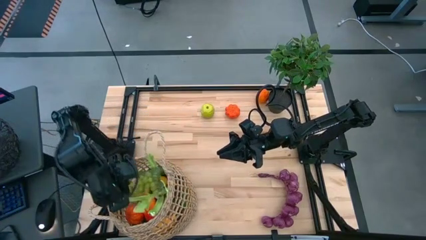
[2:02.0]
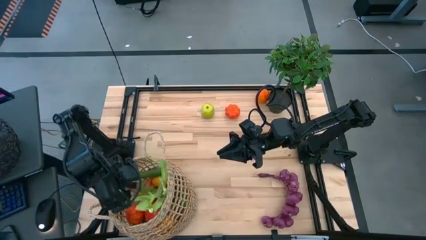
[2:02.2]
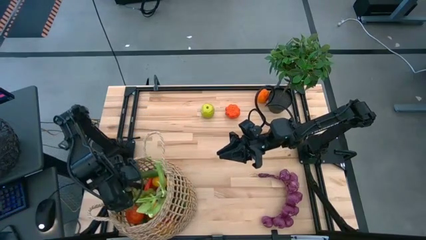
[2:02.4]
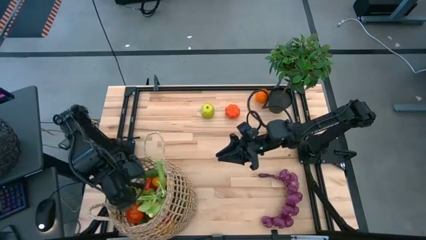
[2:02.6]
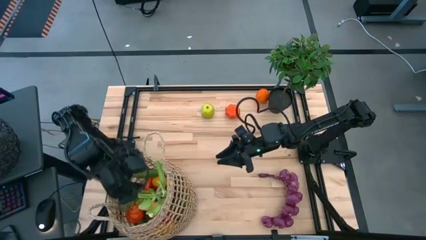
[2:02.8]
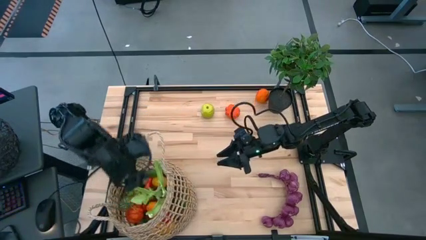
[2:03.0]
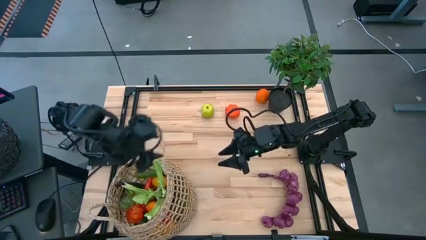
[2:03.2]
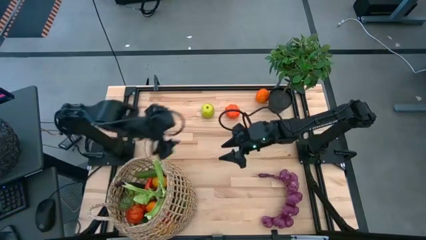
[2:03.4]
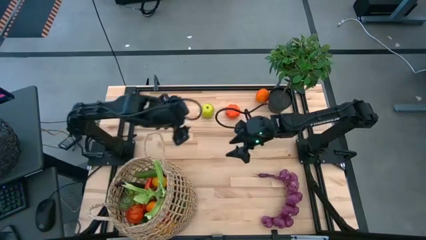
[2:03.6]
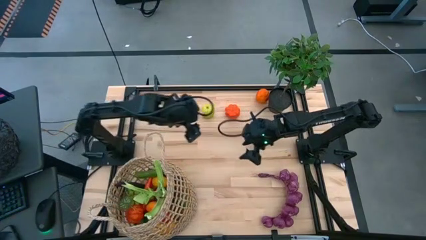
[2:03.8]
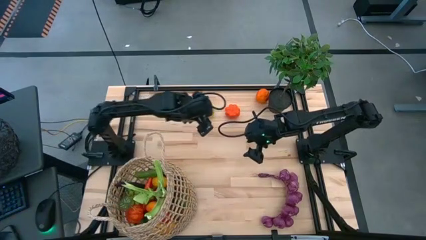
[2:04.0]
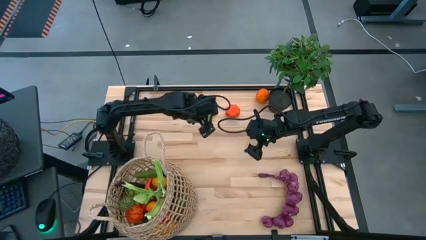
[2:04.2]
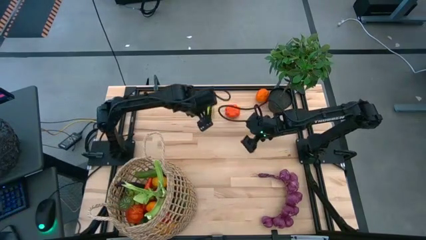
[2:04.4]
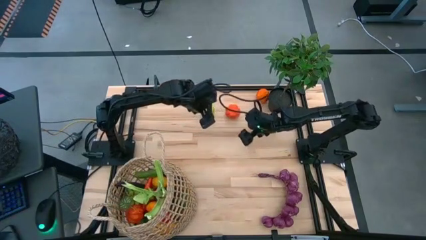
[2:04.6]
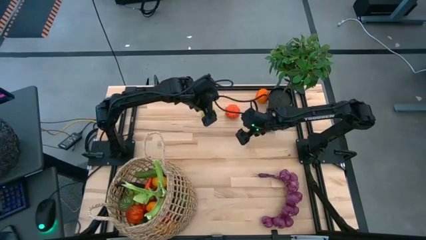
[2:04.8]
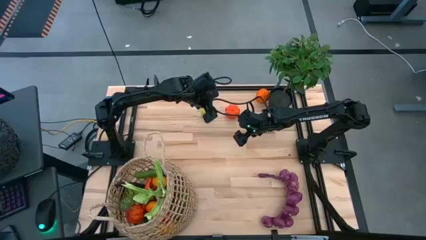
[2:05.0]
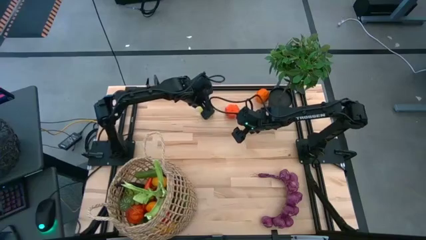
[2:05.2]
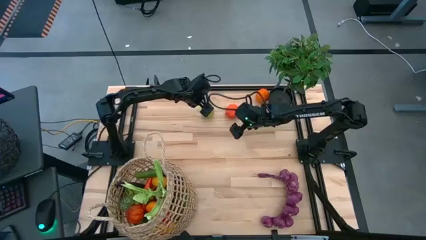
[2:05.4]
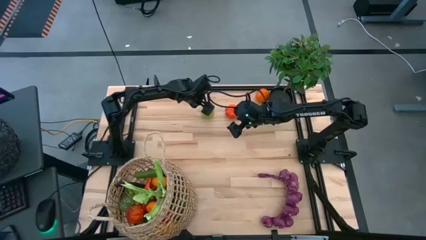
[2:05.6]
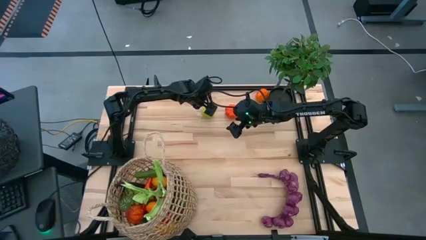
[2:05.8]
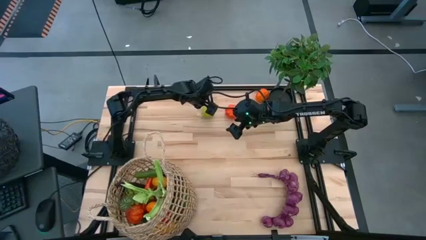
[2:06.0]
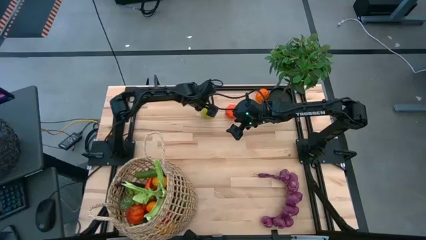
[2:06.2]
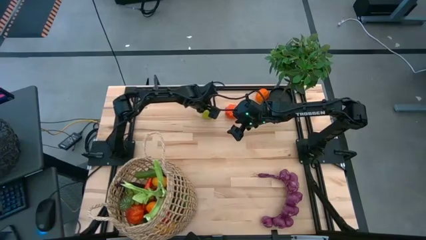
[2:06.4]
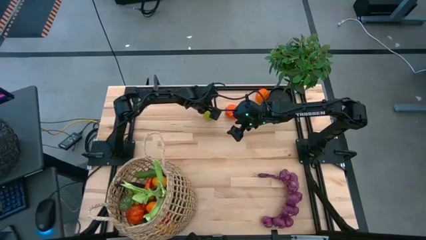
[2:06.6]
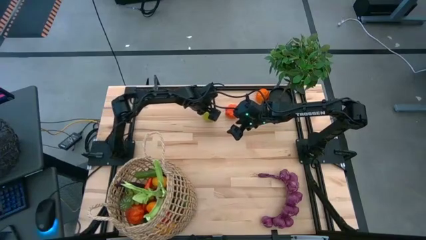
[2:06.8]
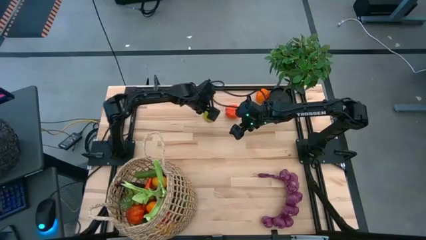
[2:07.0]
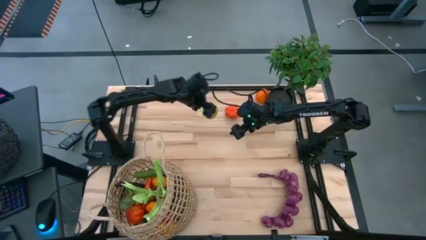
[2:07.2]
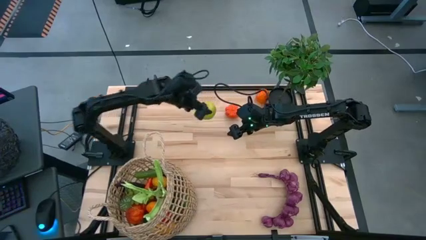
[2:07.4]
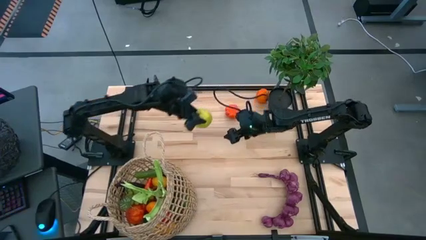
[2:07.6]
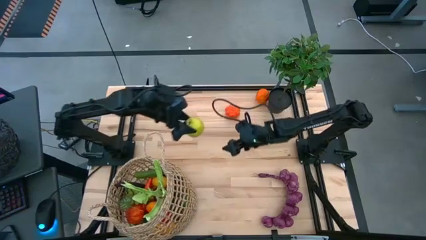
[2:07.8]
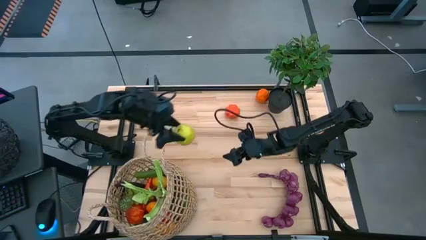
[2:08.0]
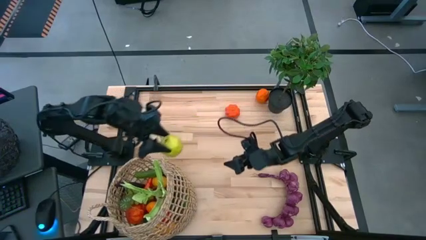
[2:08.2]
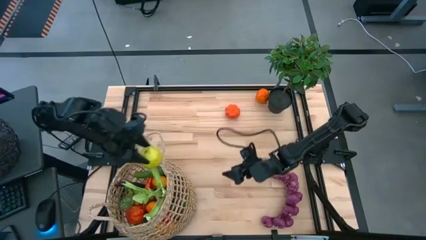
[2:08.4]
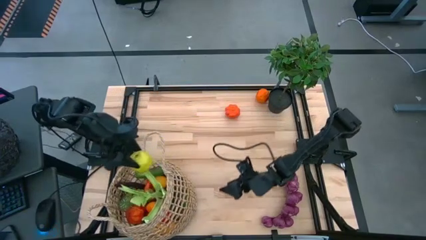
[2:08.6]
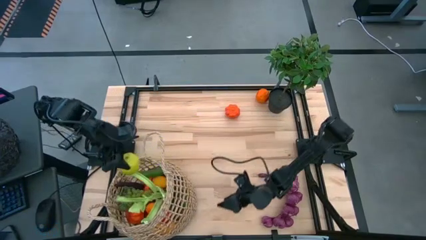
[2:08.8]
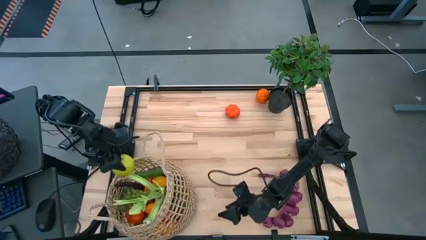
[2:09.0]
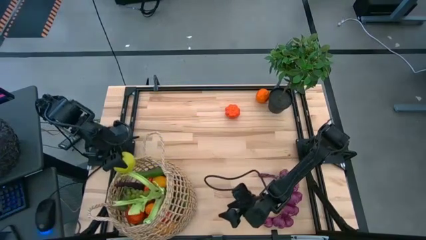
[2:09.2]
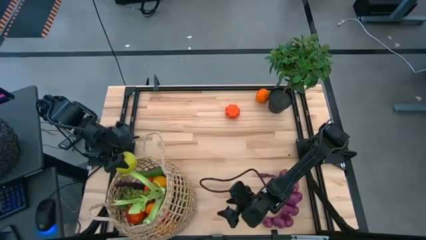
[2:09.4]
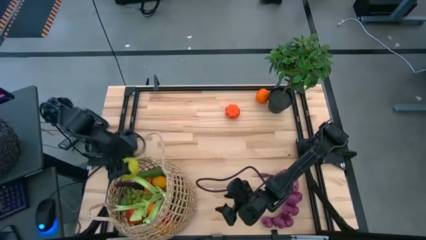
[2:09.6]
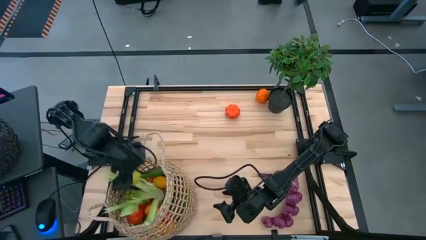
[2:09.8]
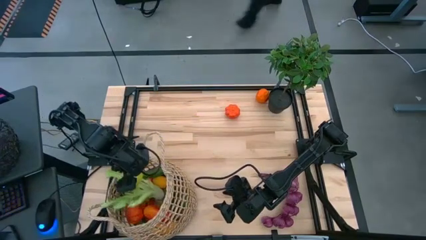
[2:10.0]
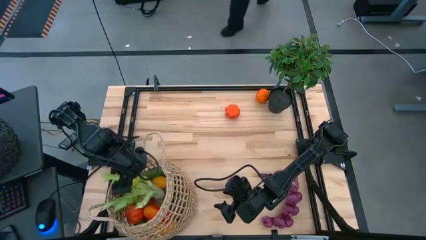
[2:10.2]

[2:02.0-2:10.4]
Task: Build produce basket
Put the apple into the basket

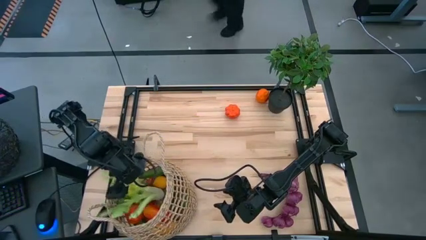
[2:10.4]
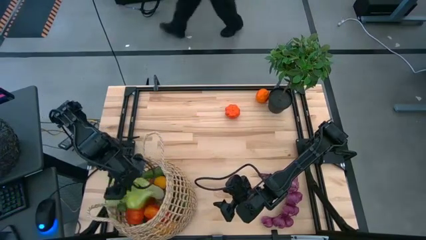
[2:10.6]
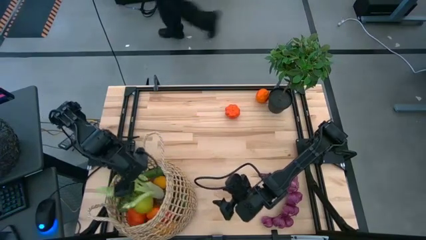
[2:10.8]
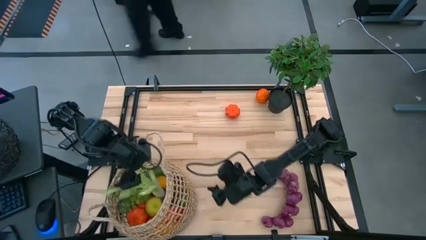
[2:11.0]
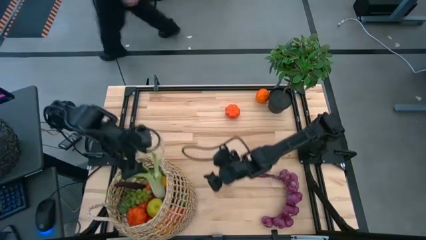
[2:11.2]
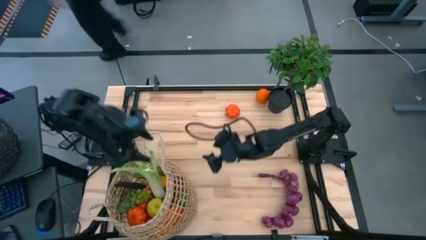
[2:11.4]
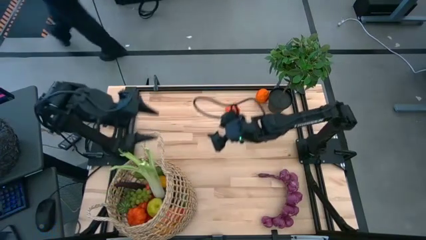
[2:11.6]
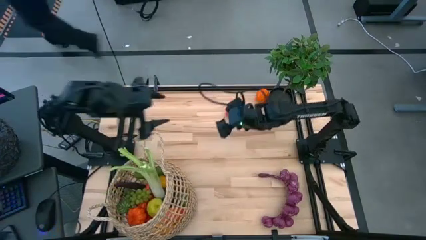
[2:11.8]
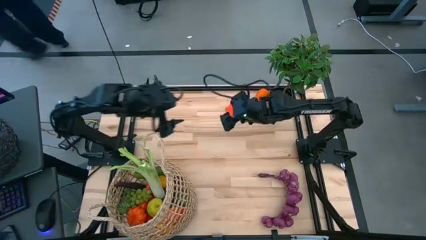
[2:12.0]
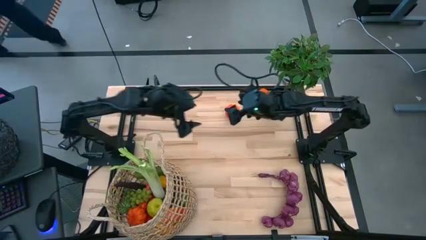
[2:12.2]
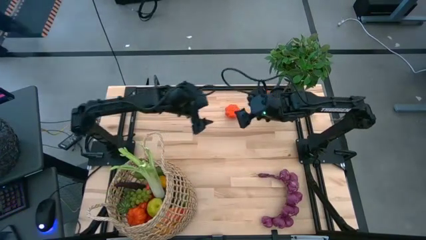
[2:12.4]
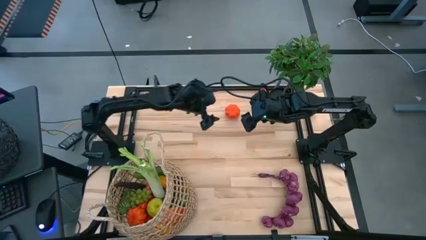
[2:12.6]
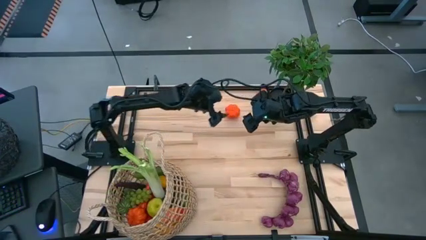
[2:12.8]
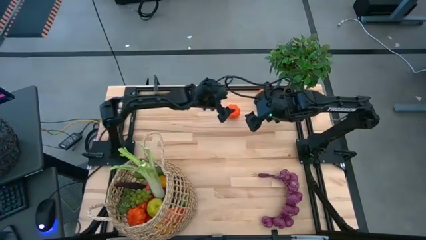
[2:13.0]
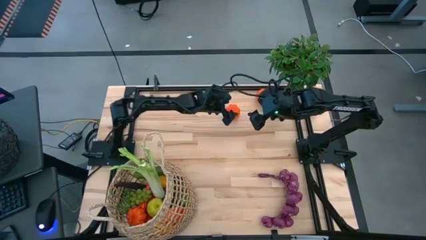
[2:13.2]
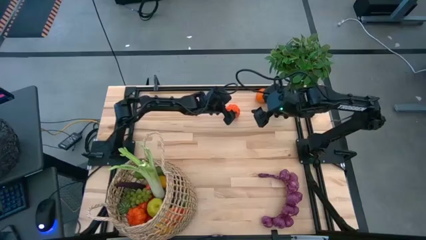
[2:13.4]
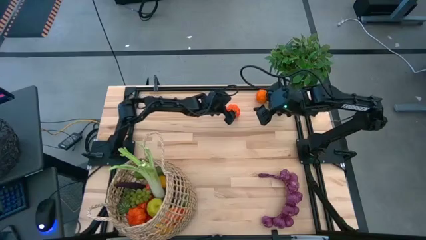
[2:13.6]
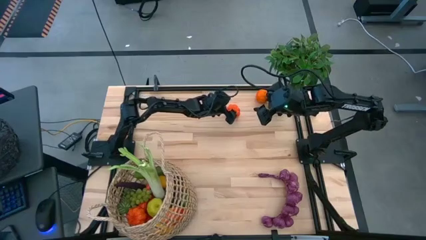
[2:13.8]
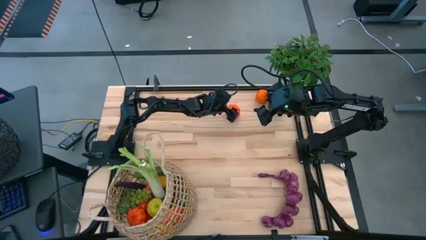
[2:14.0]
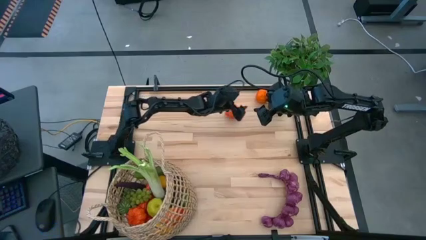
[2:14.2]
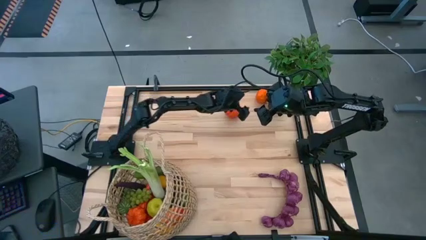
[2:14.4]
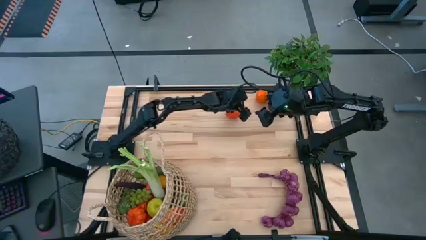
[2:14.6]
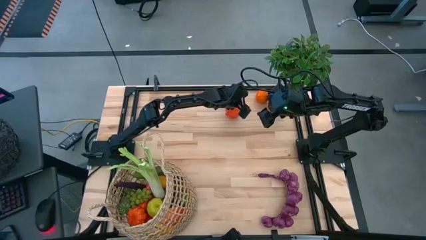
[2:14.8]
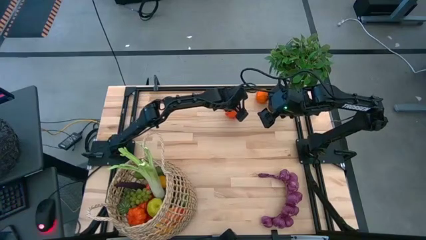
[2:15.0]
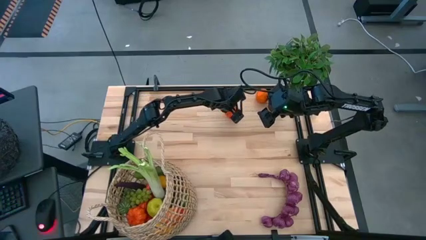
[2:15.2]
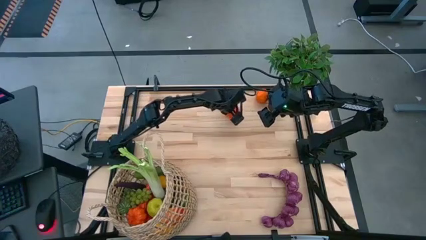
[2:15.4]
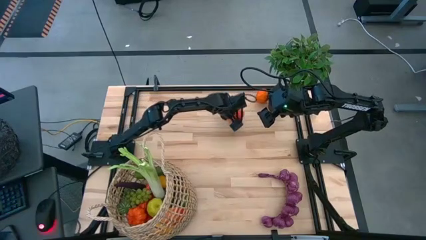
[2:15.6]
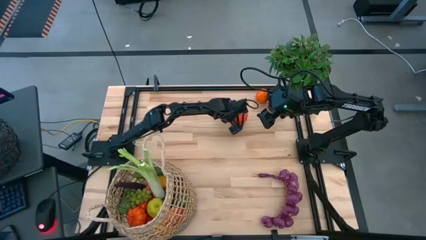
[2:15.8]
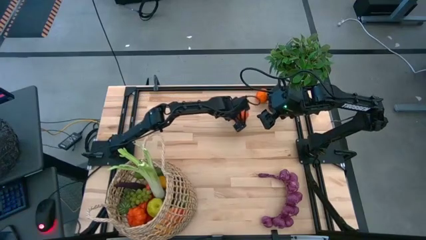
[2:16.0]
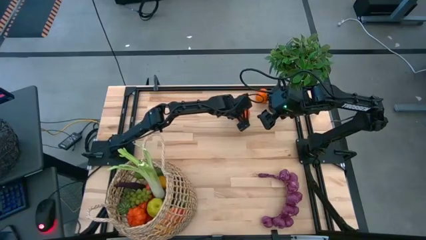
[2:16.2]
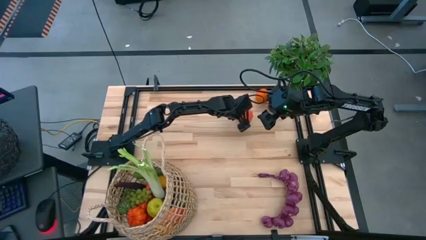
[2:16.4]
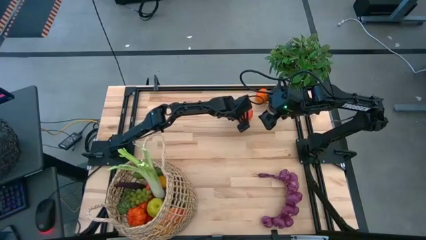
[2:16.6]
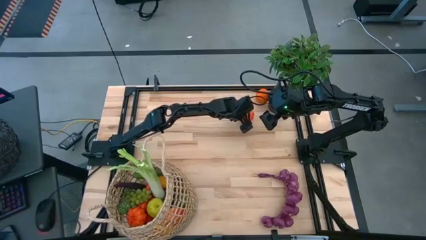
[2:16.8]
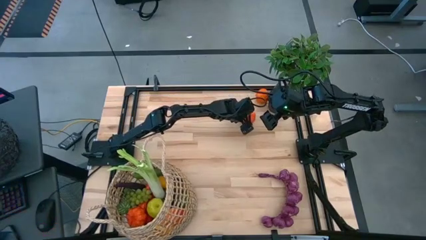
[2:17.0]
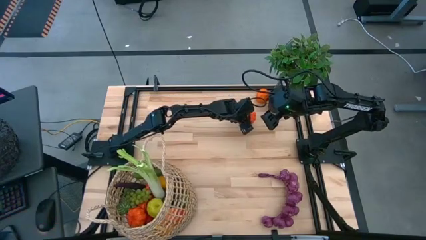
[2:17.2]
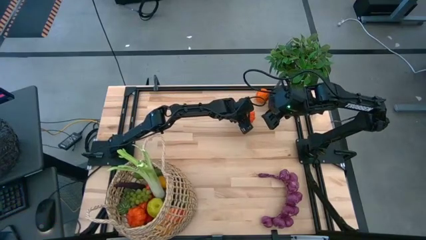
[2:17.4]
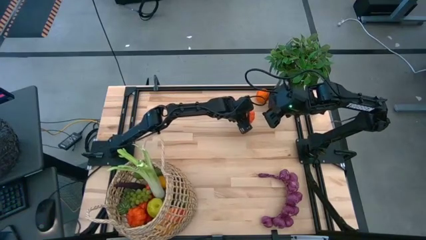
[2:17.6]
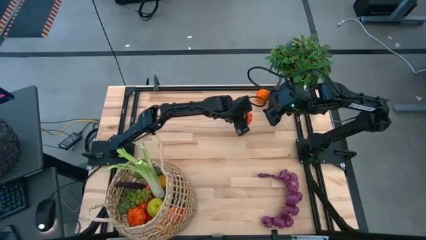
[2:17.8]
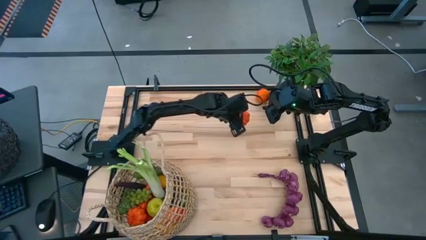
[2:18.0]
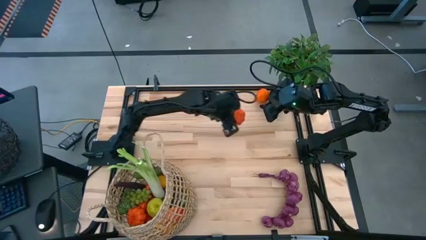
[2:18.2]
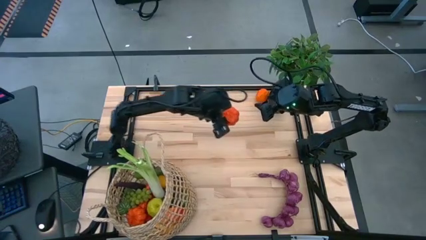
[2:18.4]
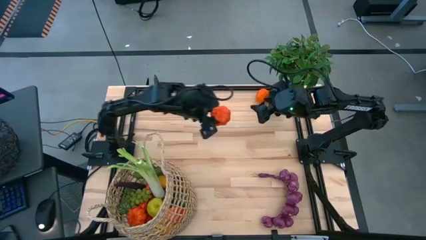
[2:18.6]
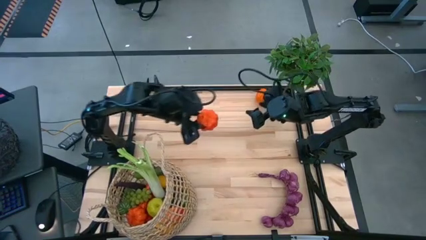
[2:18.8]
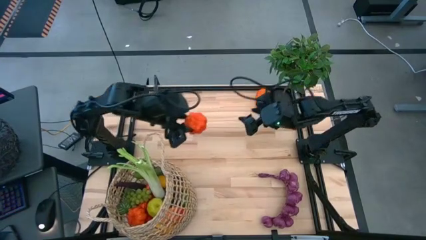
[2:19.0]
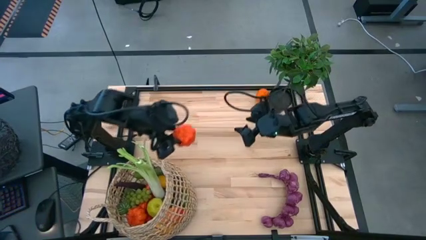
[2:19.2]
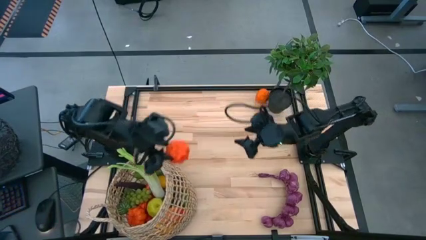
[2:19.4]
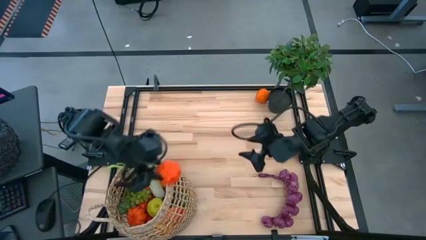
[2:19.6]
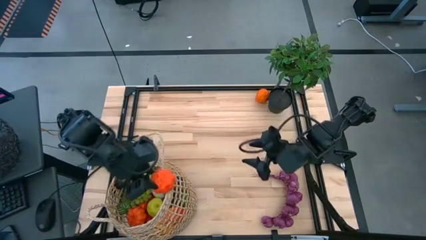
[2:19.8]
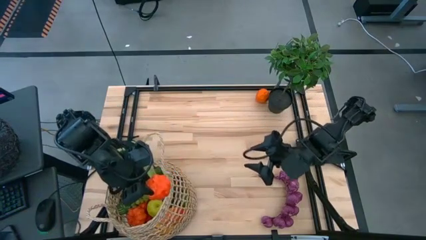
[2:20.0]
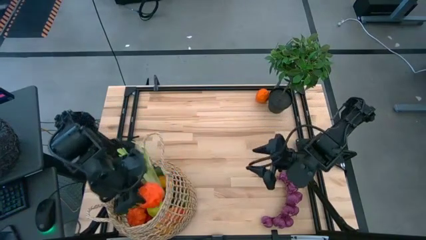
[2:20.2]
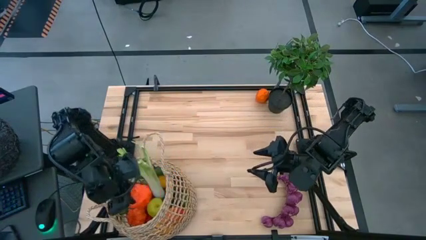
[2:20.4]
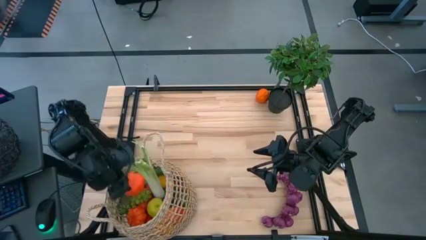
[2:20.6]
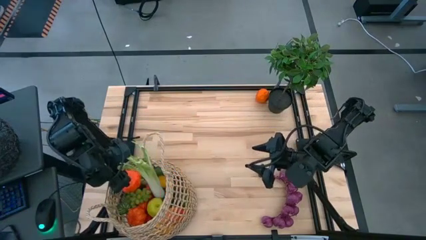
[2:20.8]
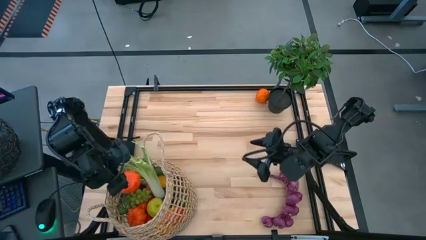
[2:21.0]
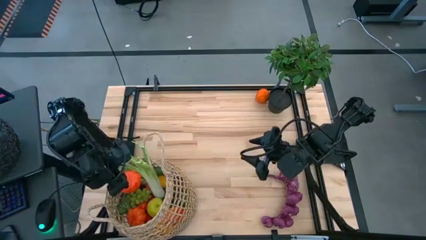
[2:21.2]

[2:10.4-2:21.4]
Put the pumpkin into the basket
